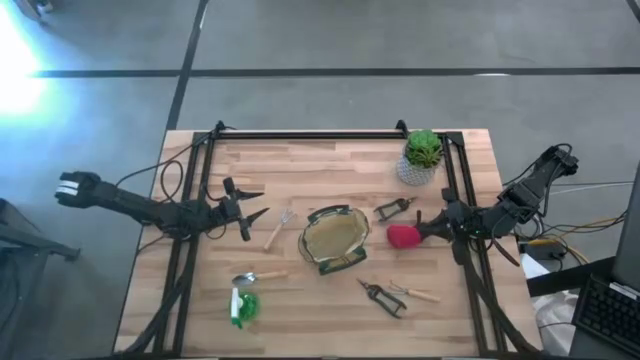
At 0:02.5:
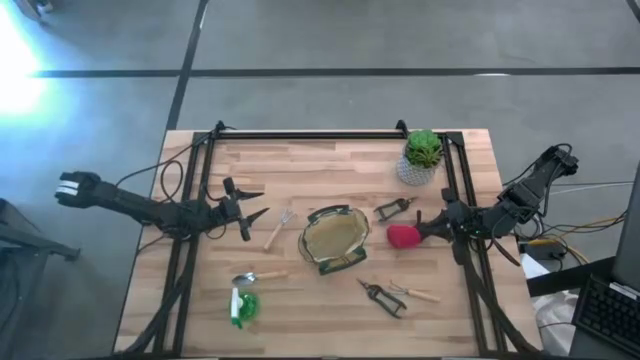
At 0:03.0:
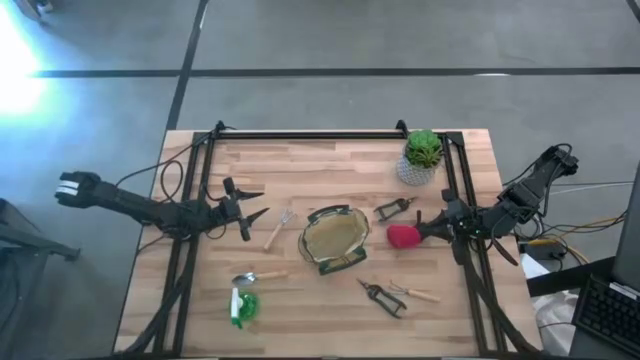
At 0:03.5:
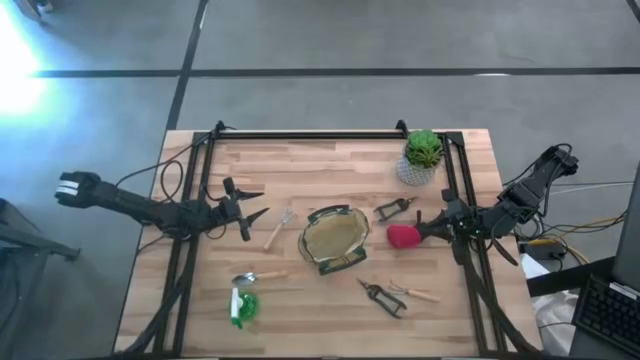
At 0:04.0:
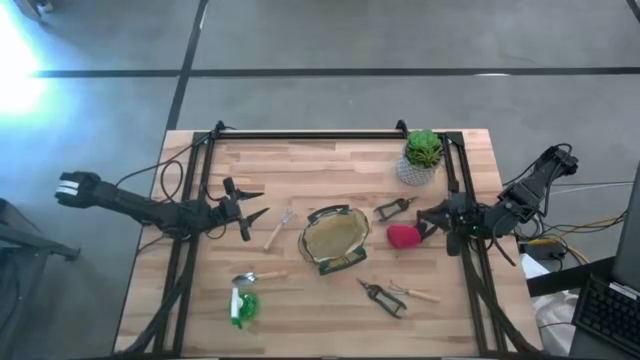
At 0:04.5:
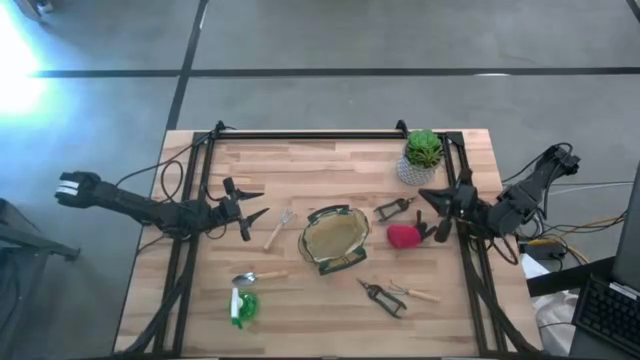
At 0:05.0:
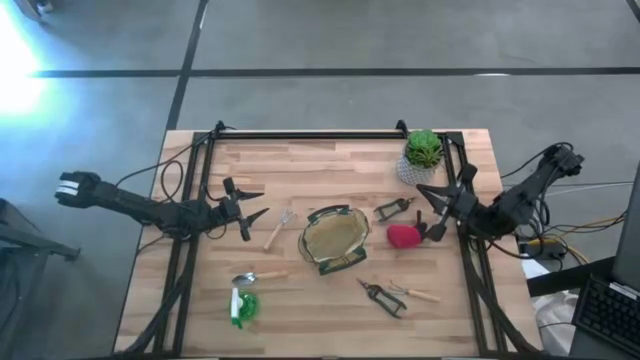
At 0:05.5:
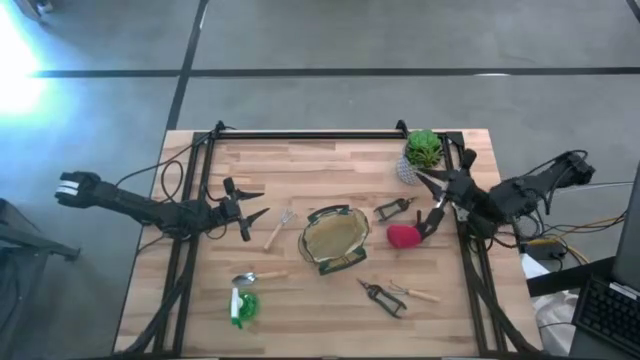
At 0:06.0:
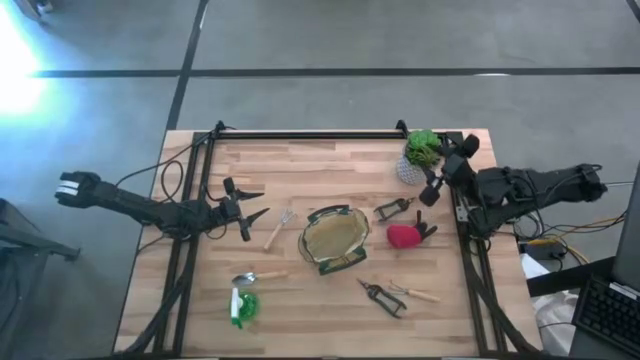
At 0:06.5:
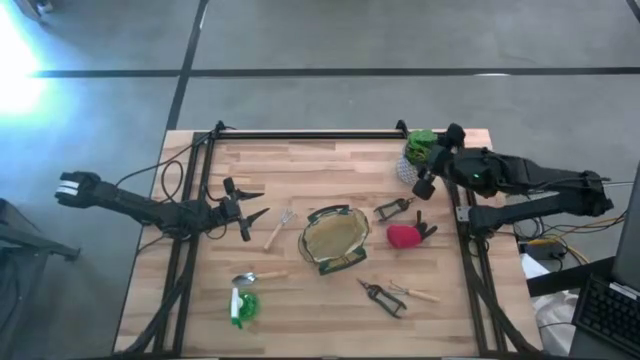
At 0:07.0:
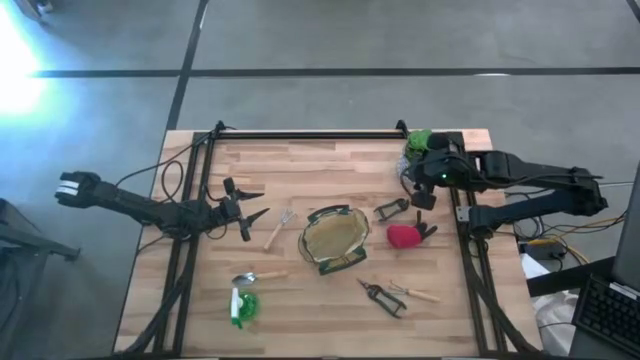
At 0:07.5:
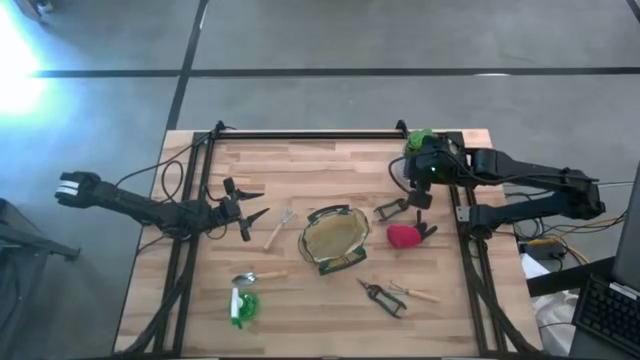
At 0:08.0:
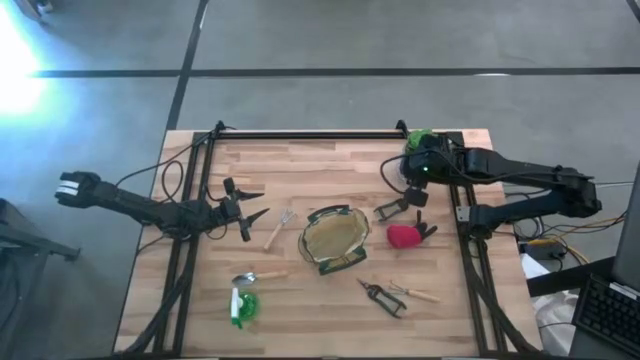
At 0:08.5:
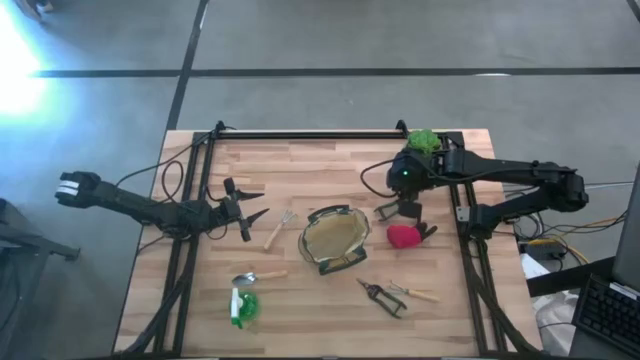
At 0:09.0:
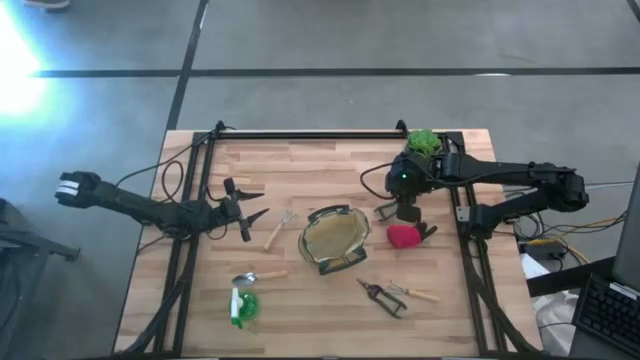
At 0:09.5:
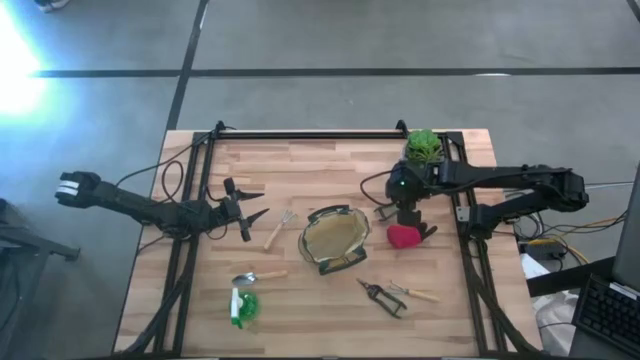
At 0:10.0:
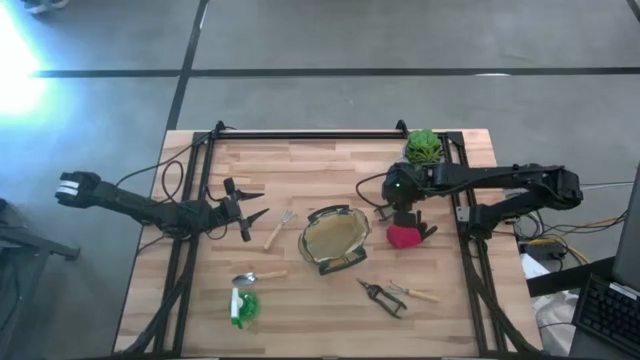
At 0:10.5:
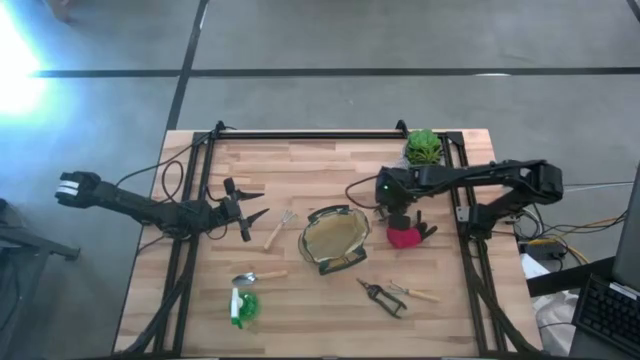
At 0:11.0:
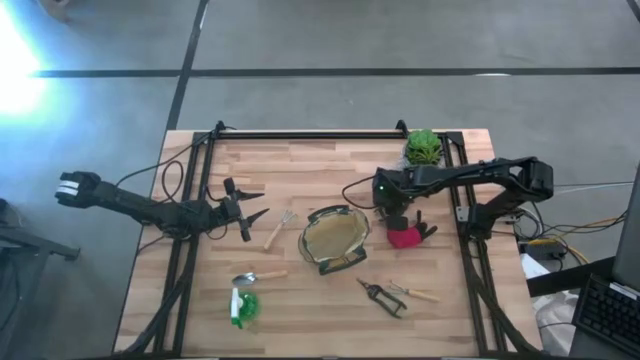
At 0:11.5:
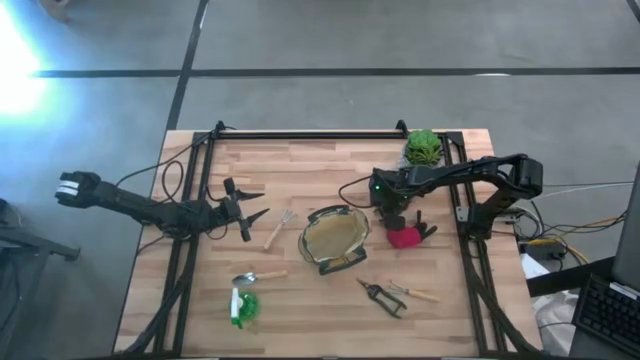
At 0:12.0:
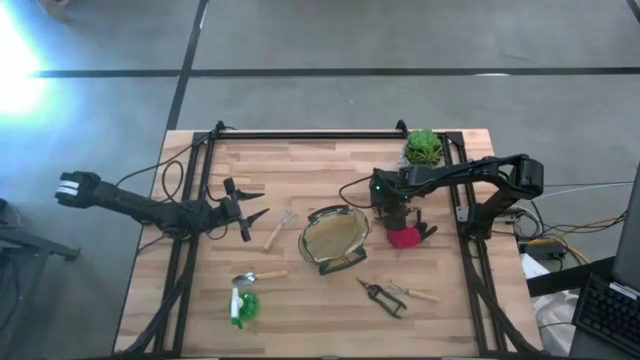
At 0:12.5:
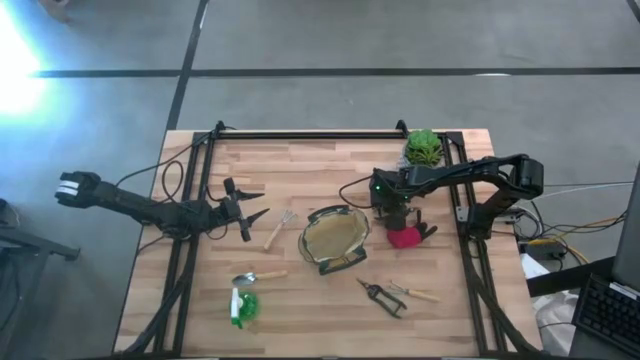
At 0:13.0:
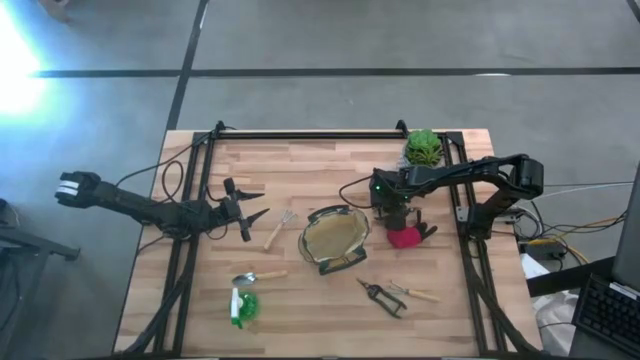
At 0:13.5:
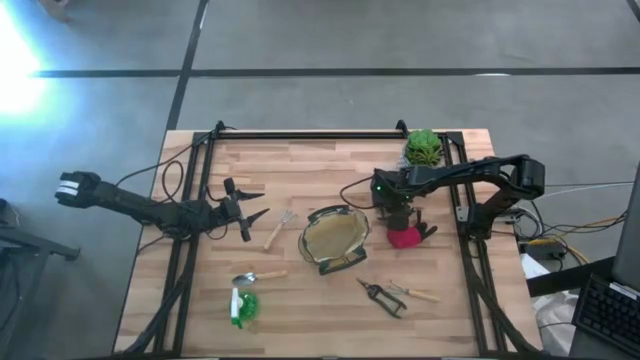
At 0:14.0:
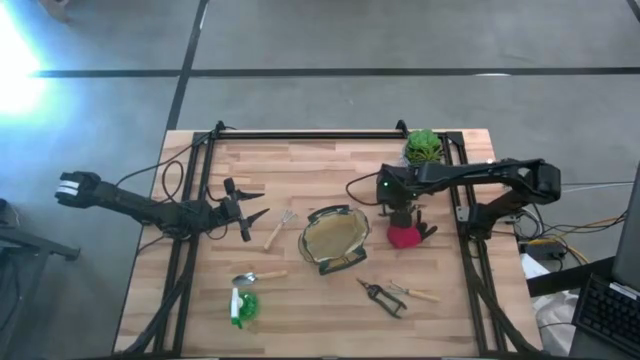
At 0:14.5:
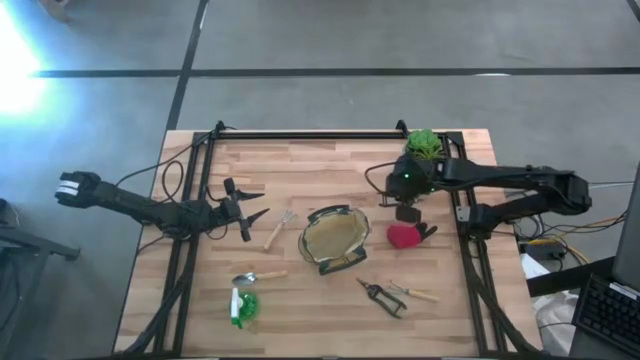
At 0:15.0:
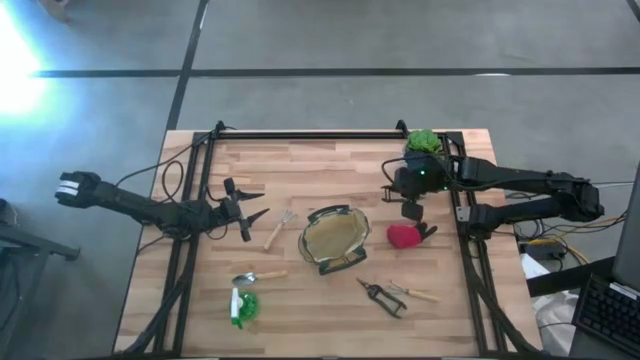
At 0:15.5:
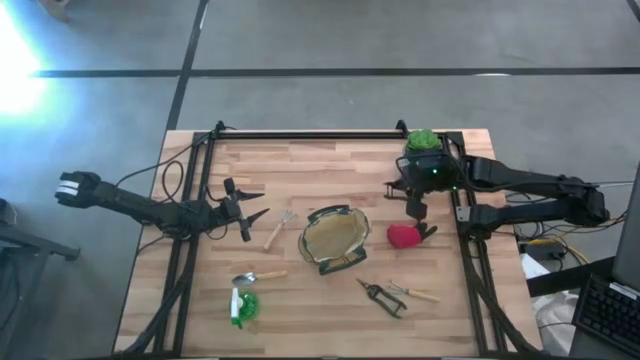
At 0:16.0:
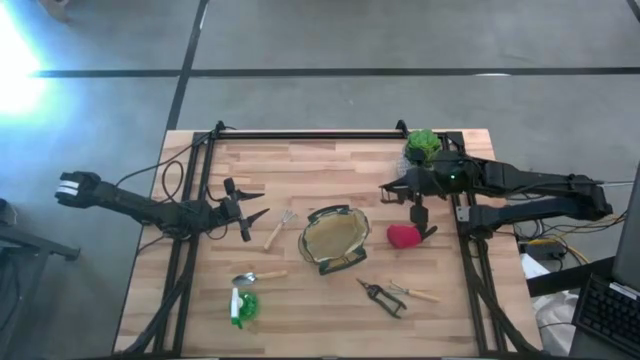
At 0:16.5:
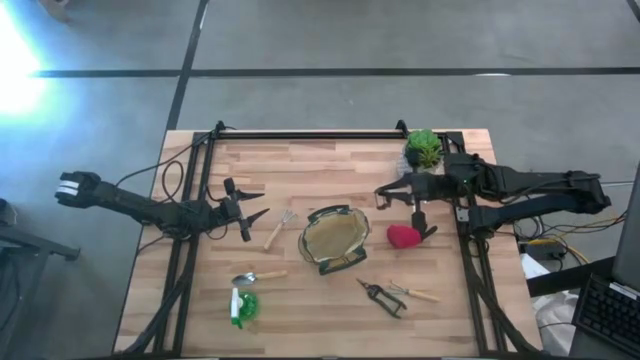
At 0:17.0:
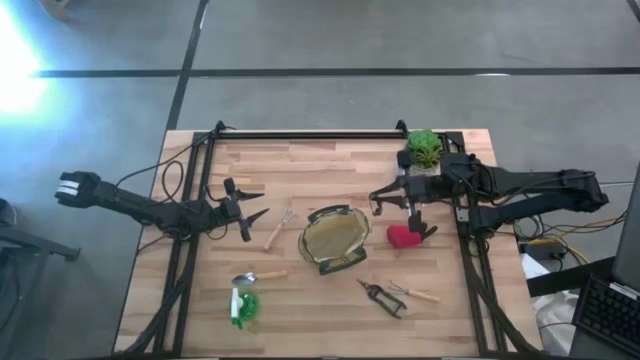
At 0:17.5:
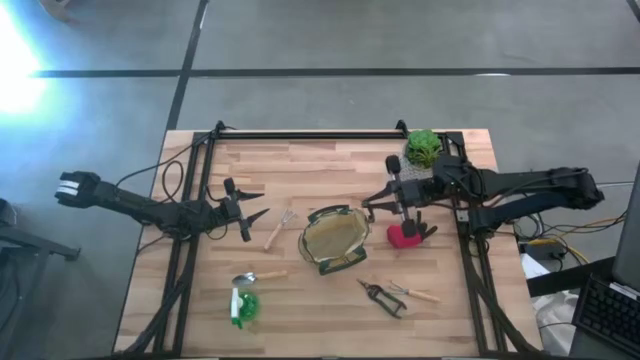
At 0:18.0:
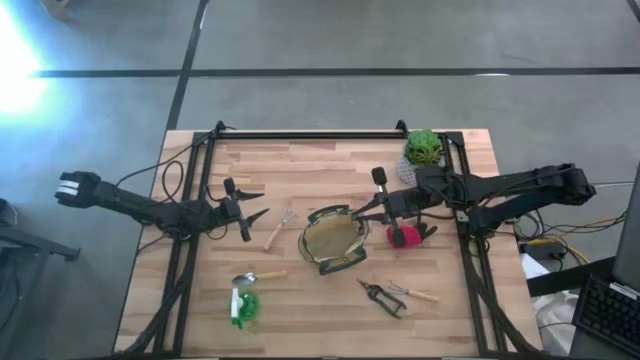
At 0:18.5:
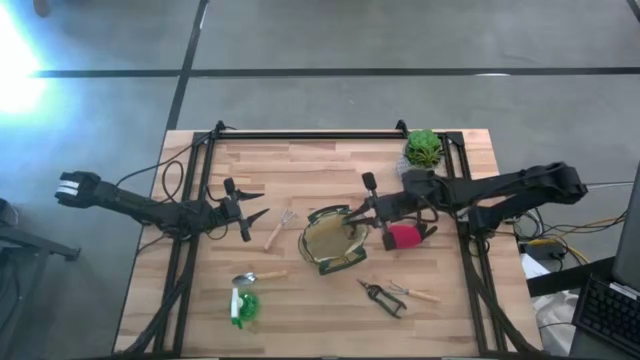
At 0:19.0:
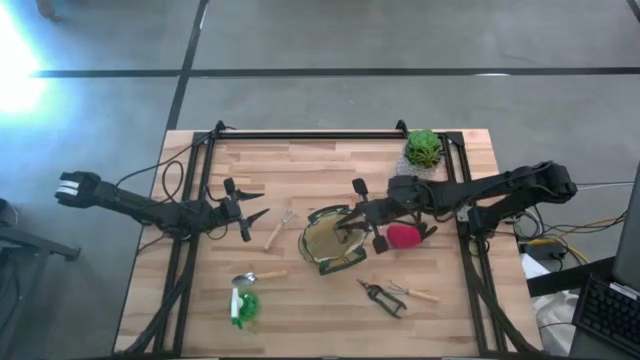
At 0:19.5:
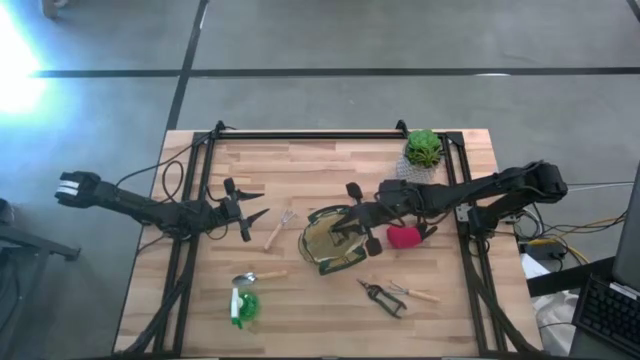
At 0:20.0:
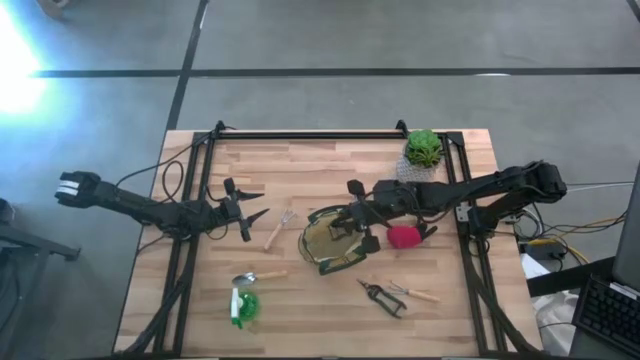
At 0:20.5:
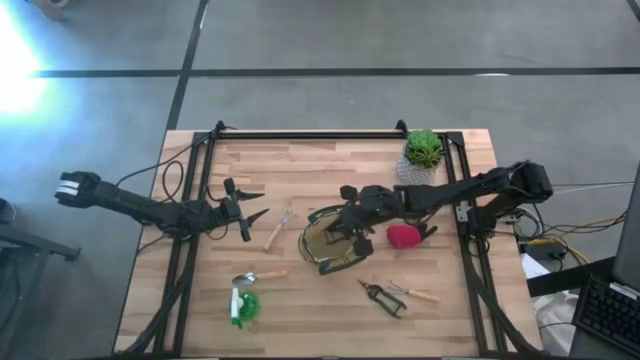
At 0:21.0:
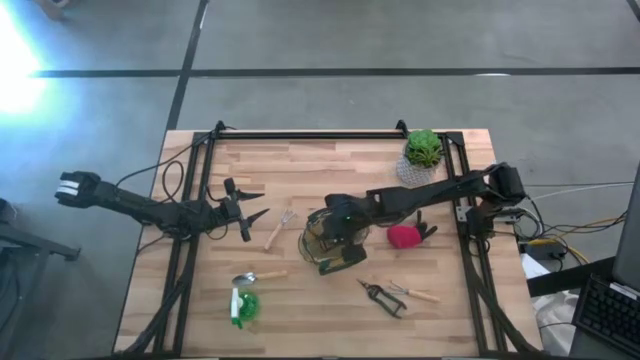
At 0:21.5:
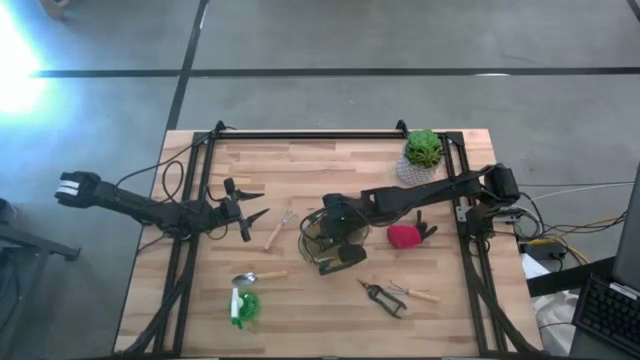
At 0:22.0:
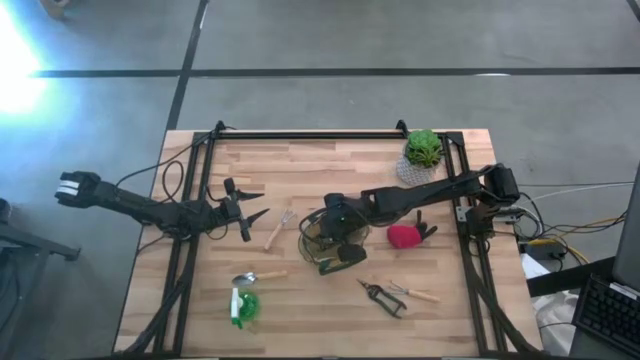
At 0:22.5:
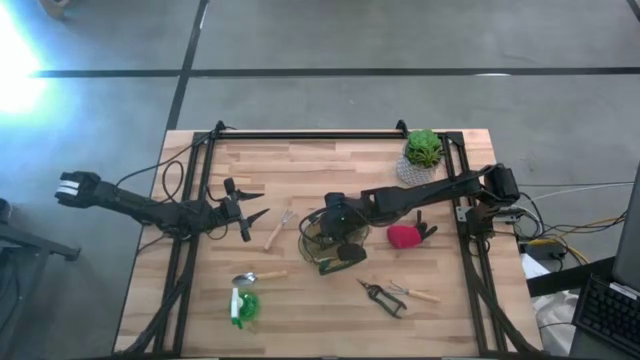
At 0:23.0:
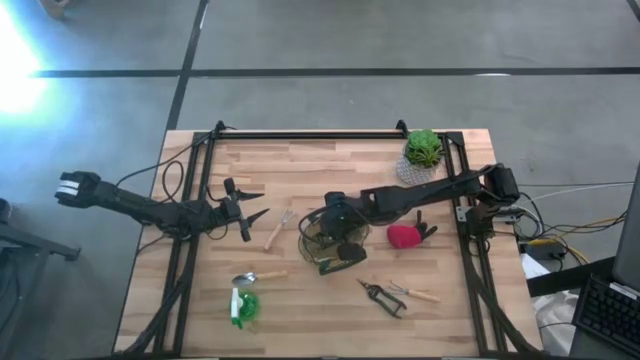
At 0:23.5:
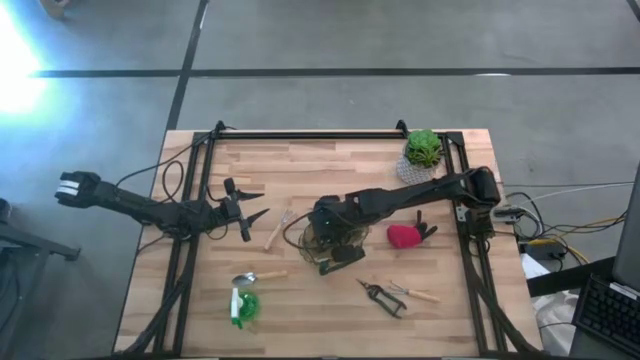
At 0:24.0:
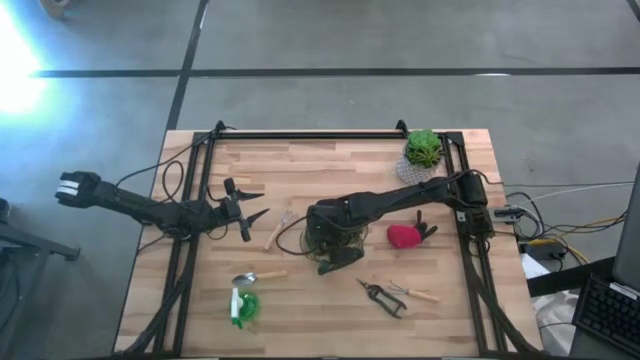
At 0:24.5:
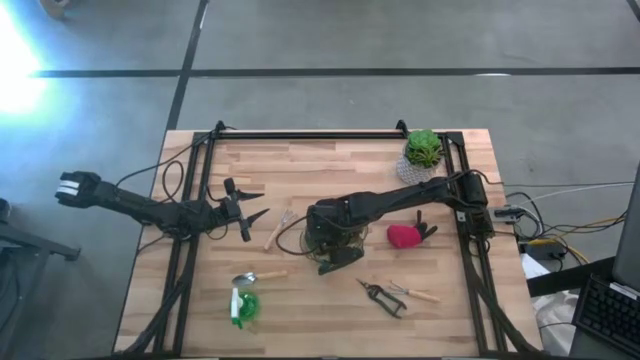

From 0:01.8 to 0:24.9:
Task: Pick & Place Garden tools in Gardening bag
Put the top green shears into the green gardening bag
